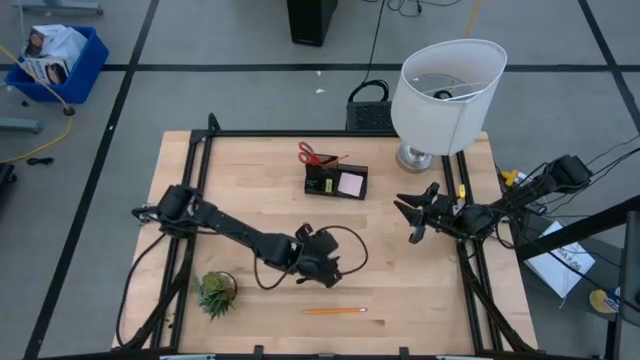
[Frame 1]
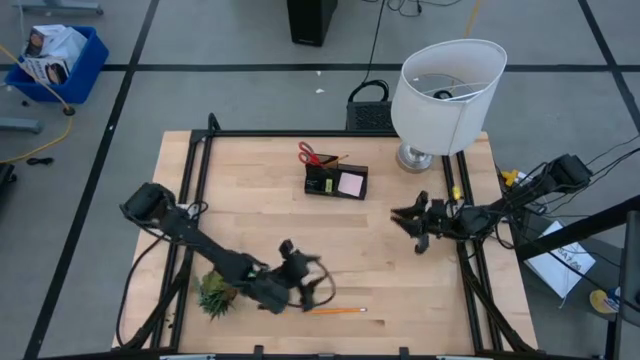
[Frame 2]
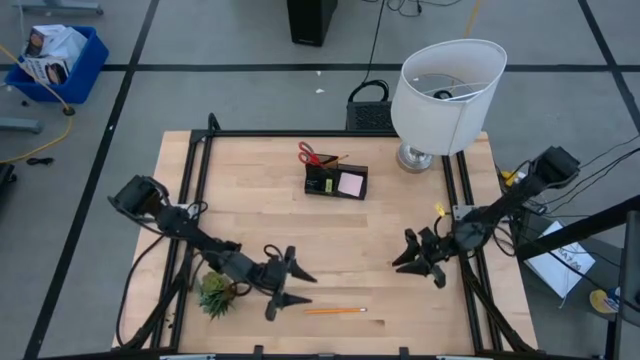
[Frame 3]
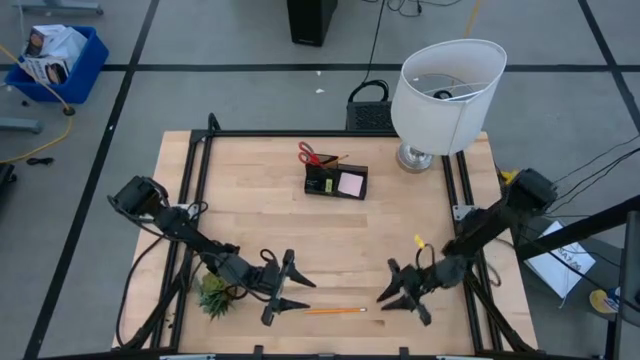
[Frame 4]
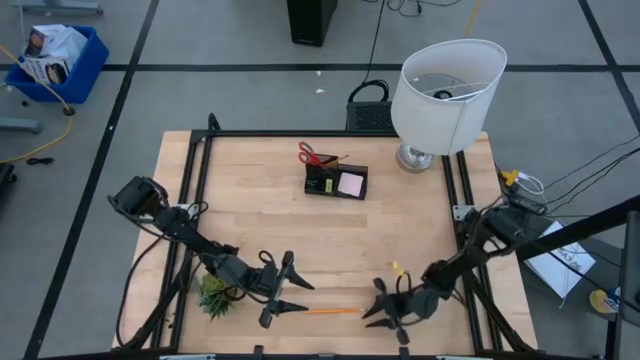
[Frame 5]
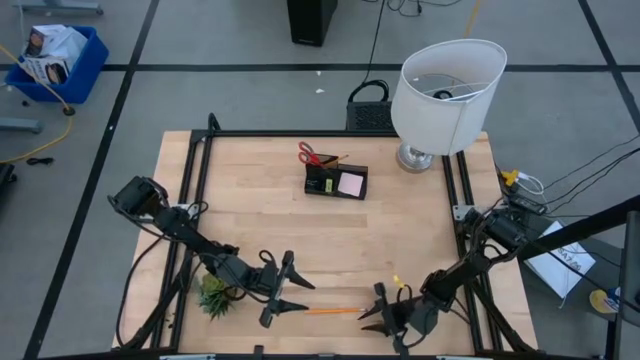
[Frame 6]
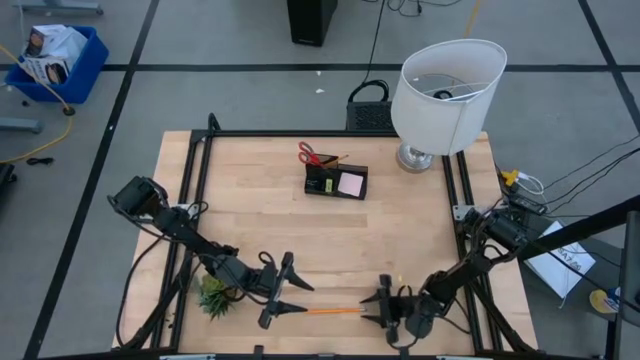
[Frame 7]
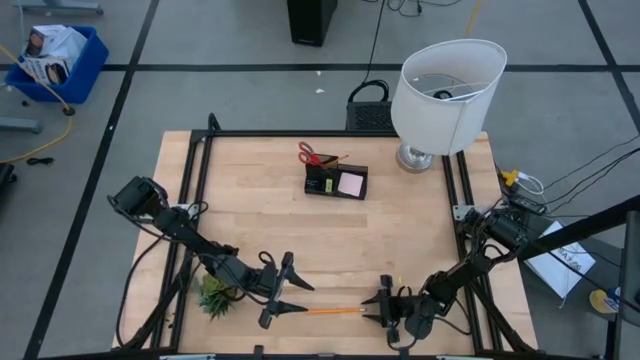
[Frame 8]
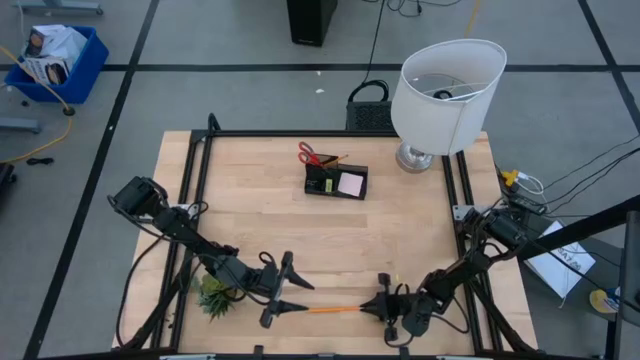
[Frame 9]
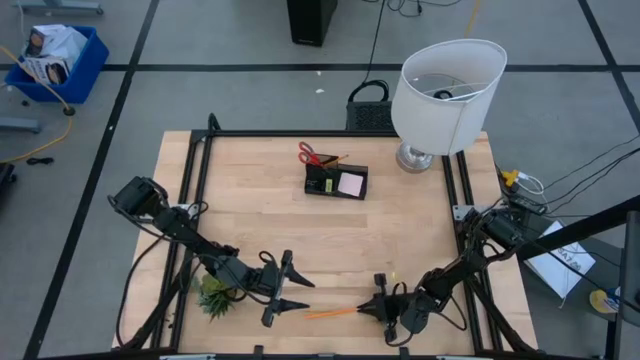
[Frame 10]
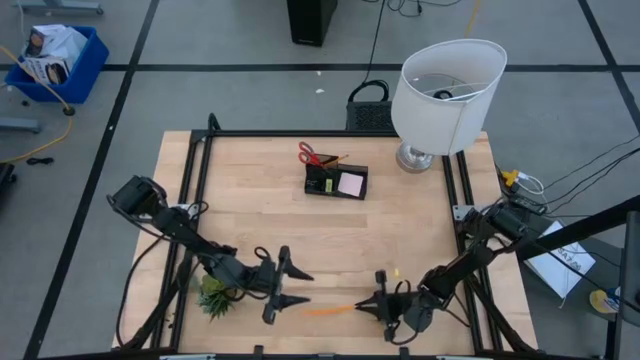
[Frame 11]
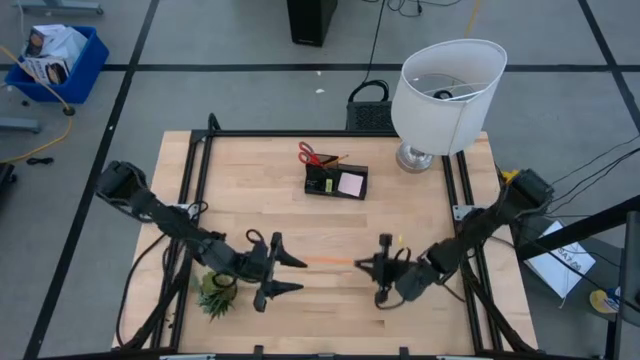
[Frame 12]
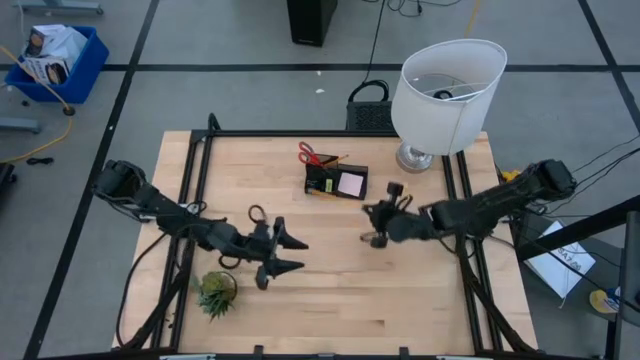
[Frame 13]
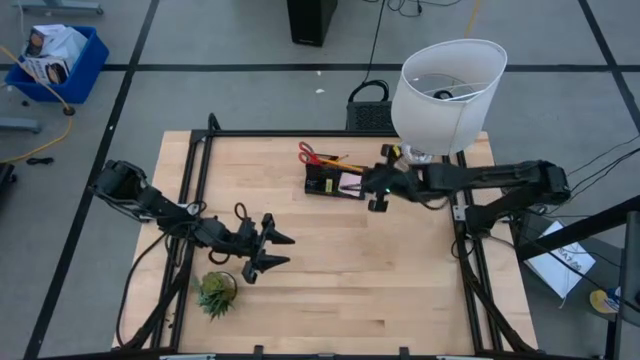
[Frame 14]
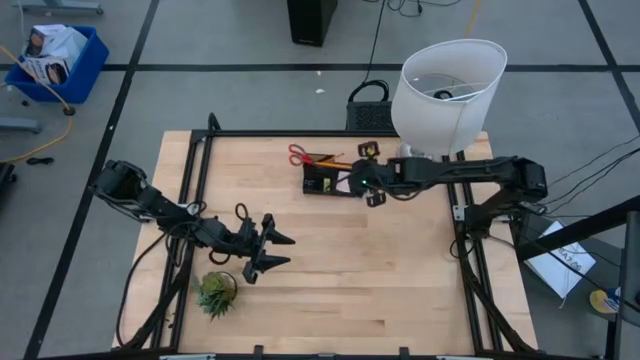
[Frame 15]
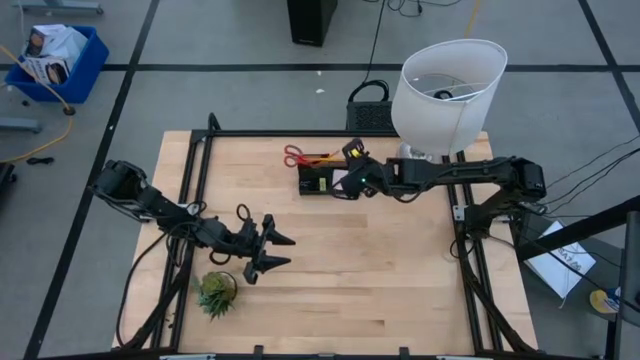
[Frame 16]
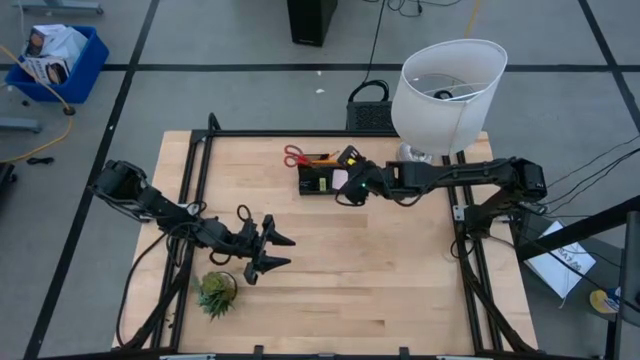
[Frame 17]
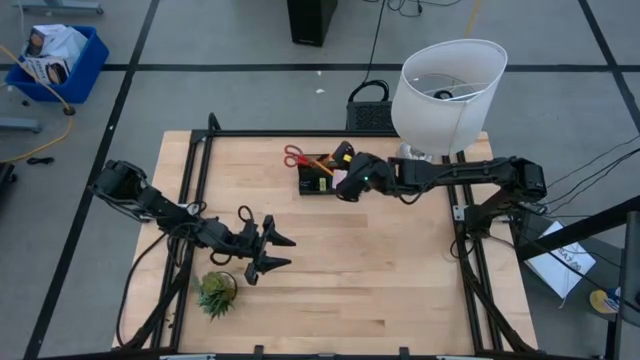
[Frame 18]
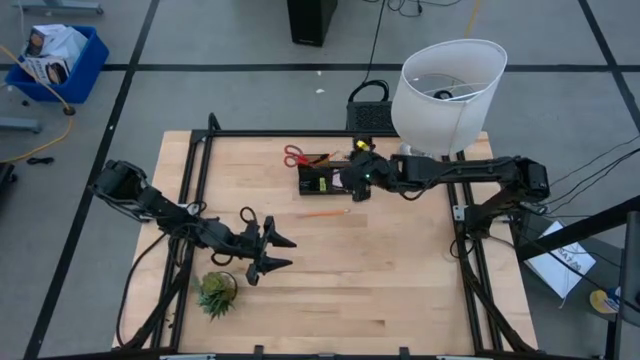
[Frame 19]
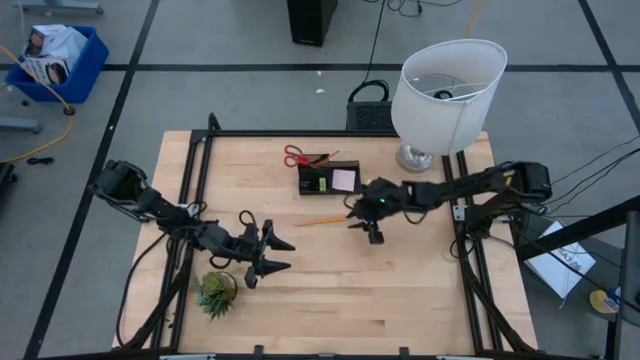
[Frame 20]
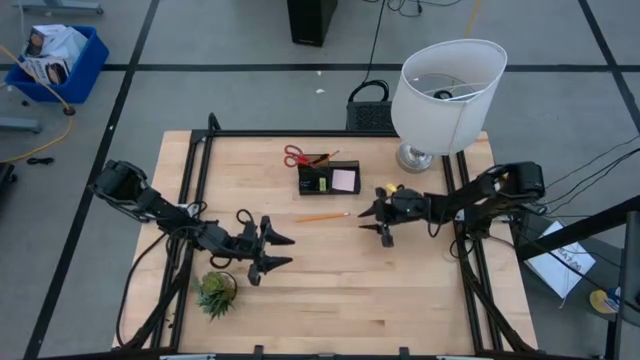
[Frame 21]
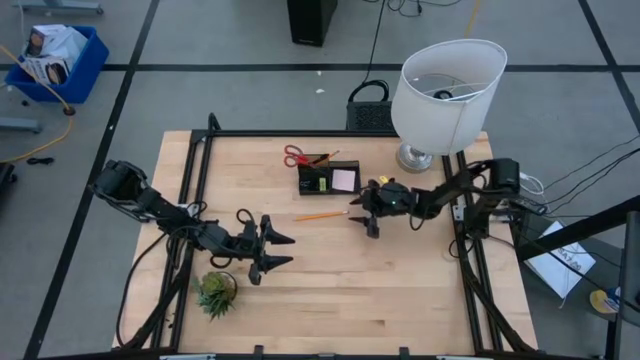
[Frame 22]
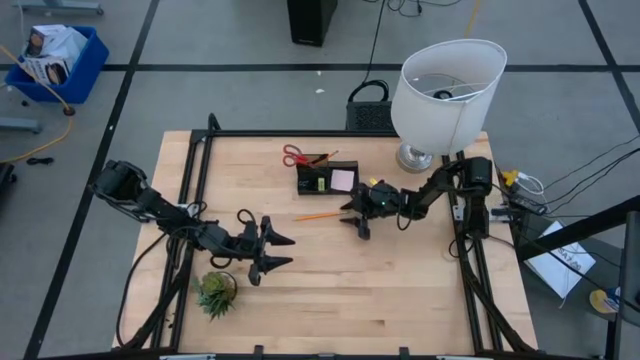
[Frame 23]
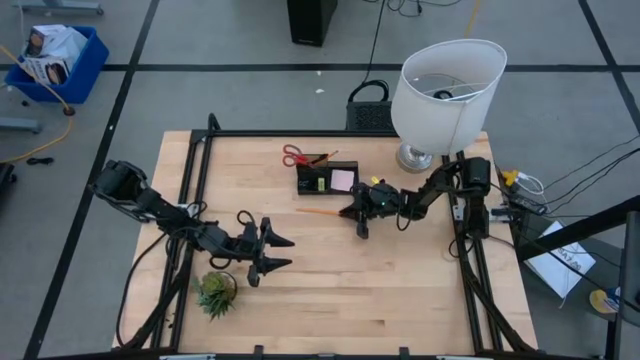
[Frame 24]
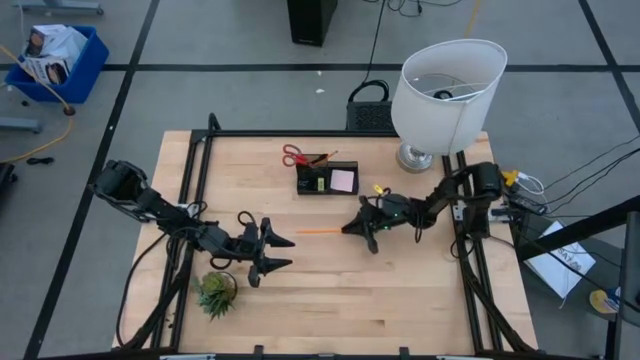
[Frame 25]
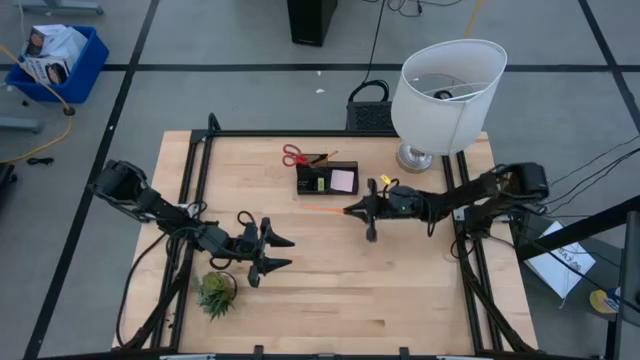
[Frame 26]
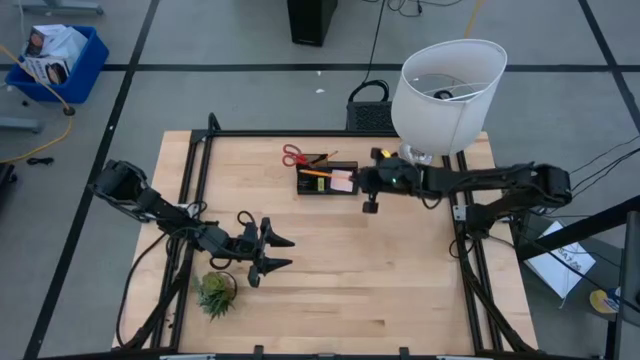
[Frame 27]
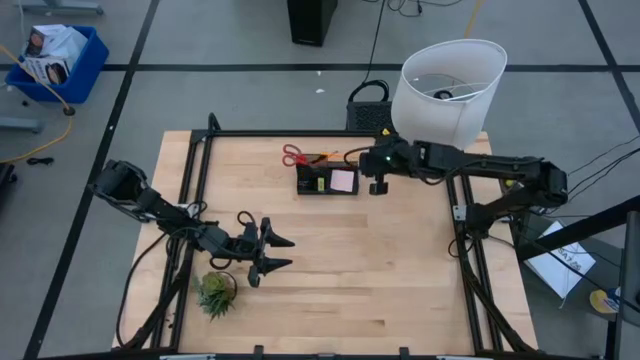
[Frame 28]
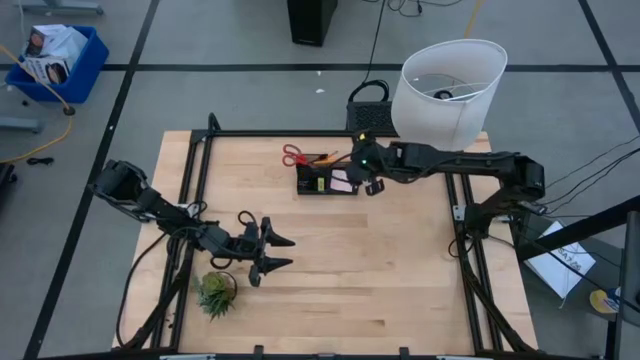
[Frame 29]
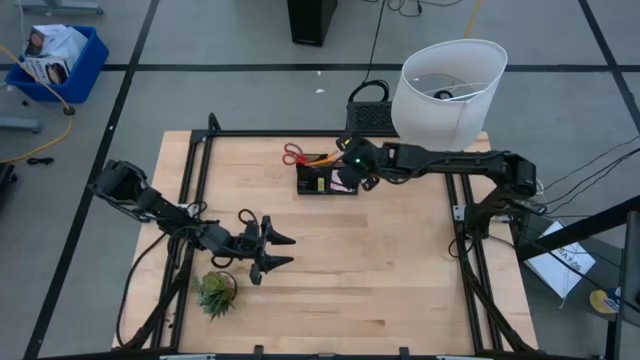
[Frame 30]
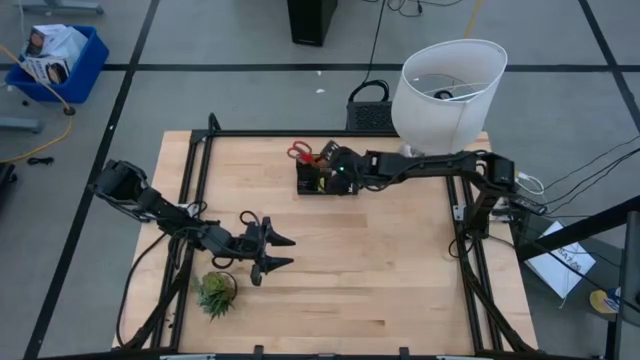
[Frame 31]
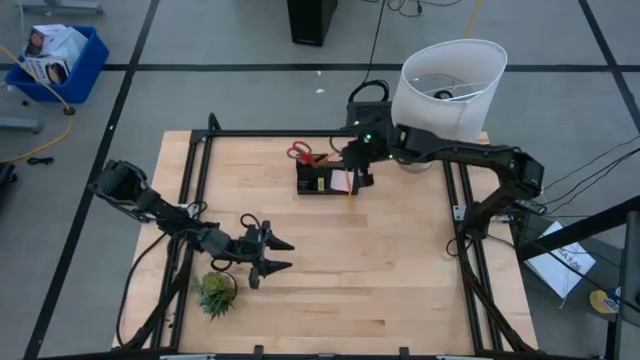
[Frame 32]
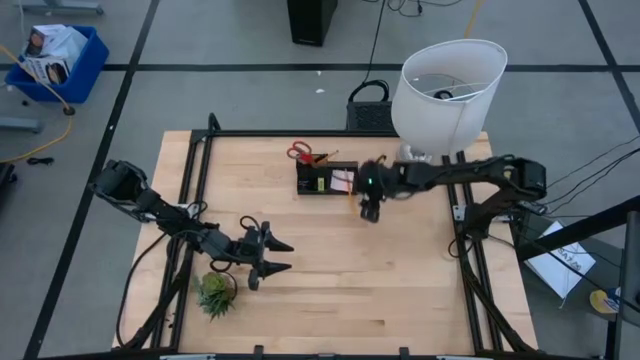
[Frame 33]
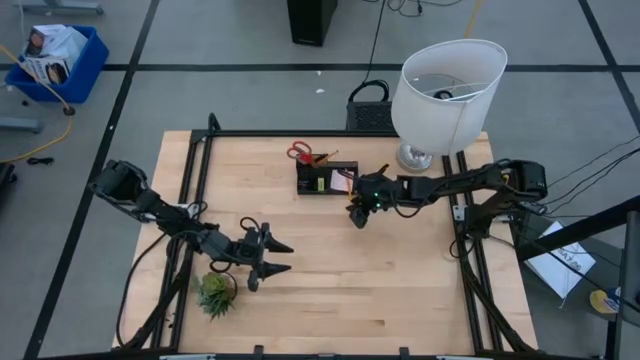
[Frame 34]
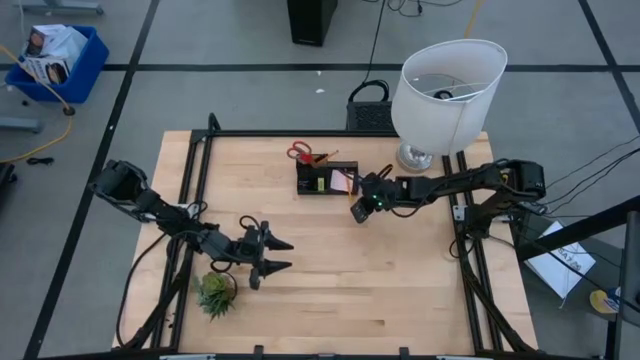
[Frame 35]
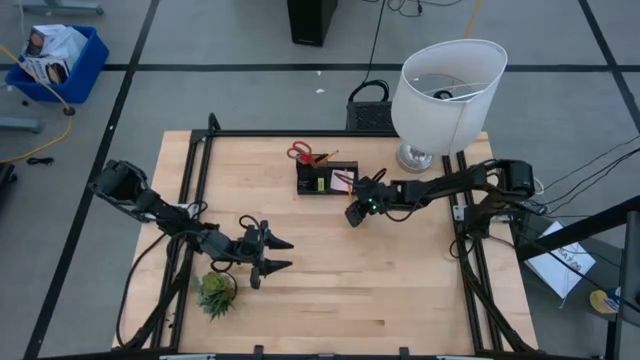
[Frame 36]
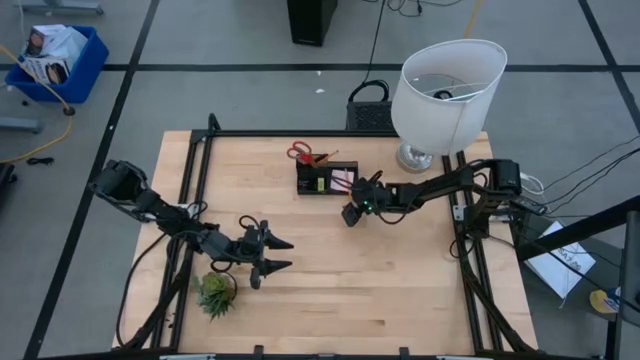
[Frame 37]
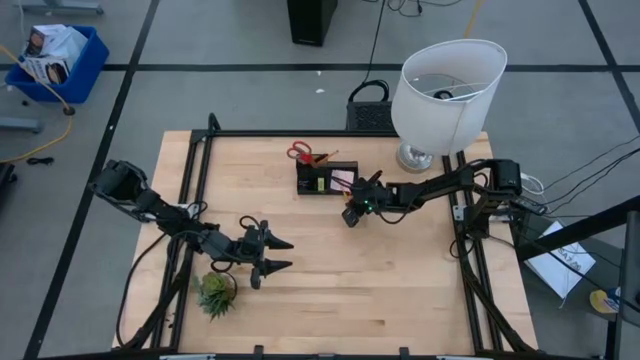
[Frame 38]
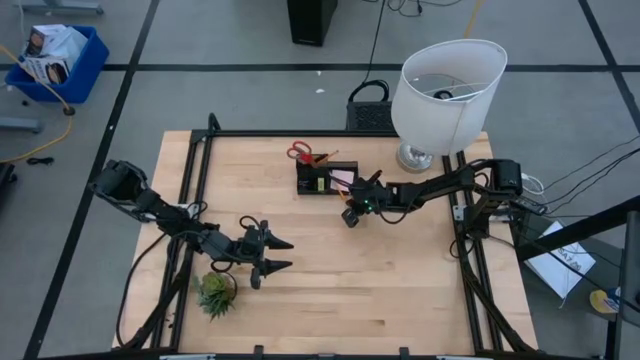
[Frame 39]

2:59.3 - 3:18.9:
Task: Pick and place office supplies into organizer
Put the yellow pencil into the desk organizer

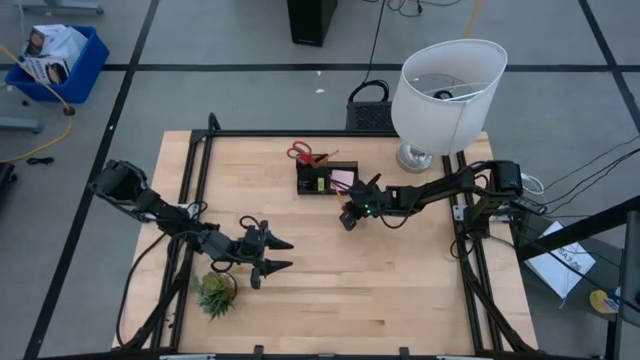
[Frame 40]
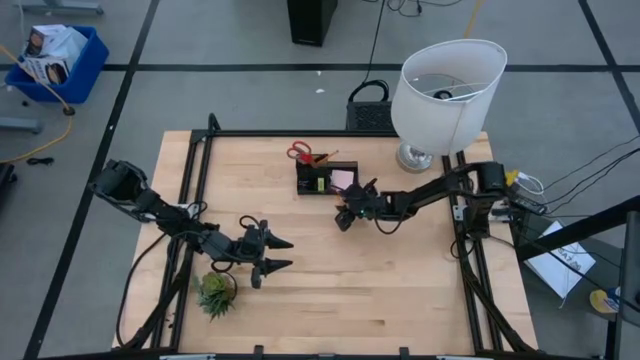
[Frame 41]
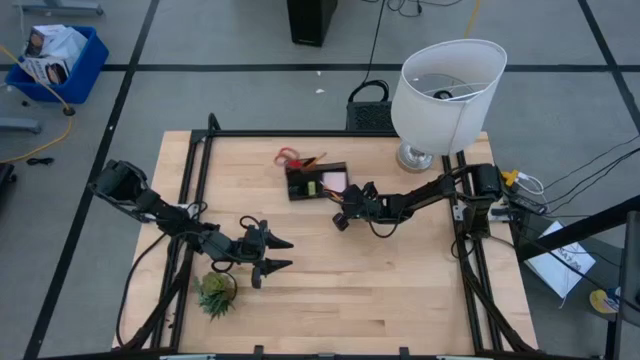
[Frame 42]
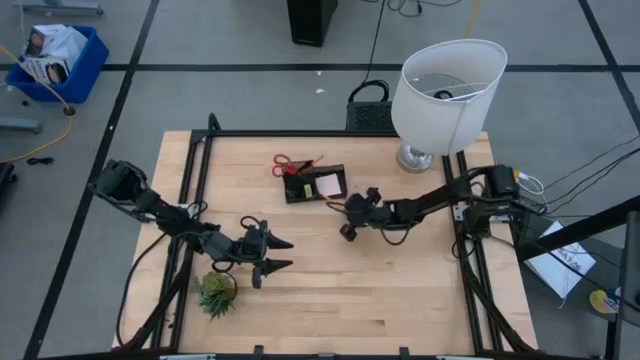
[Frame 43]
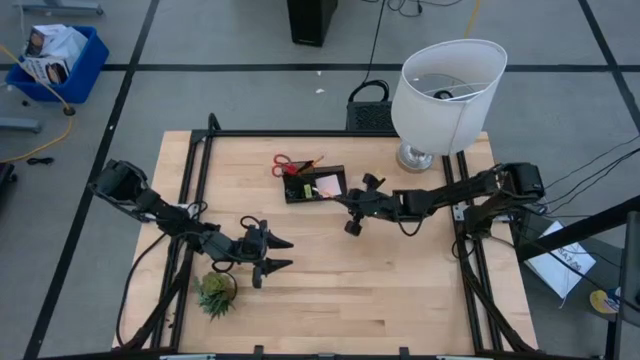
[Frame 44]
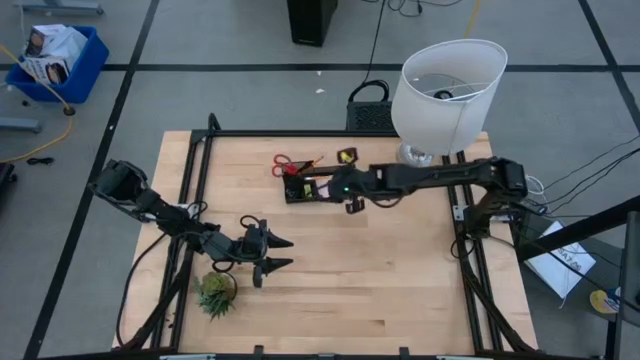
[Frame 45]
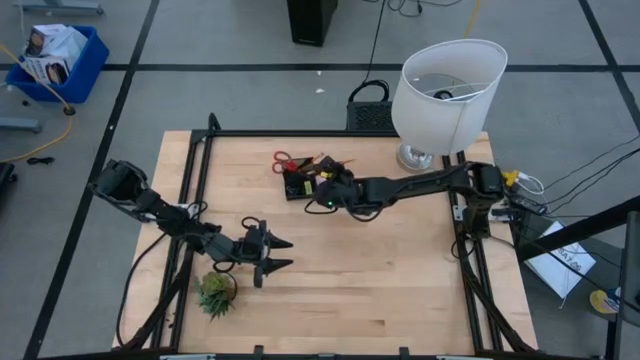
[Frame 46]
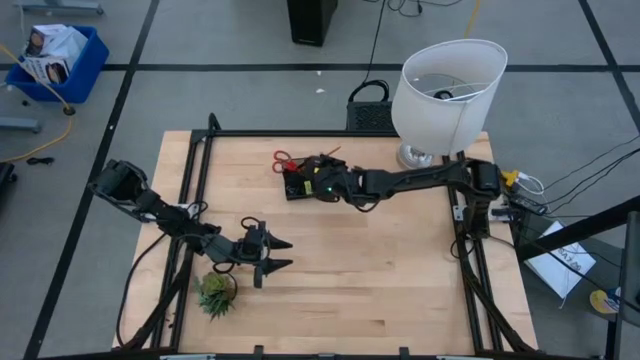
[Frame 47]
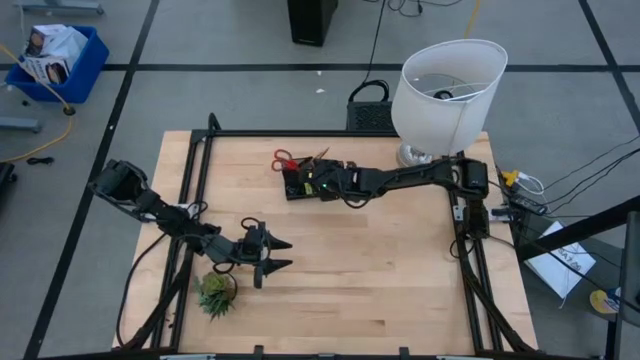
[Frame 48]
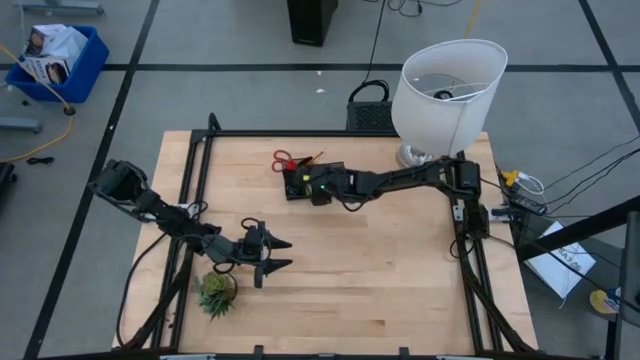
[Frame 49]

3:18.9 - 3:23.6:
Put the yellow pencil into the desk organizer
